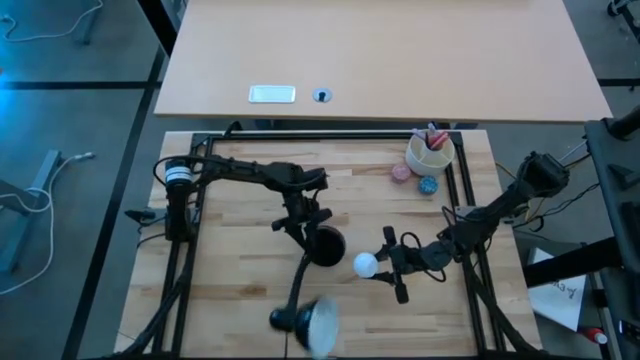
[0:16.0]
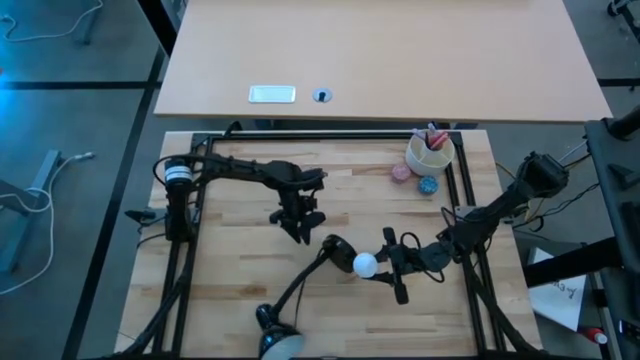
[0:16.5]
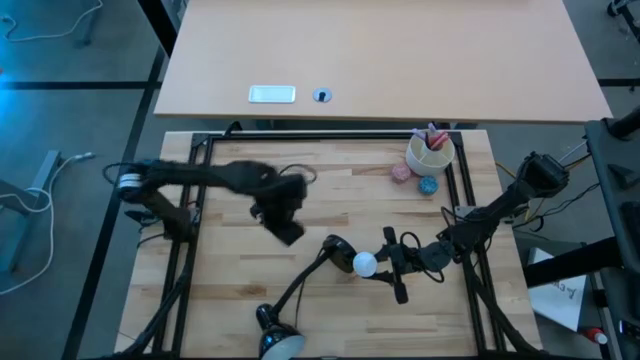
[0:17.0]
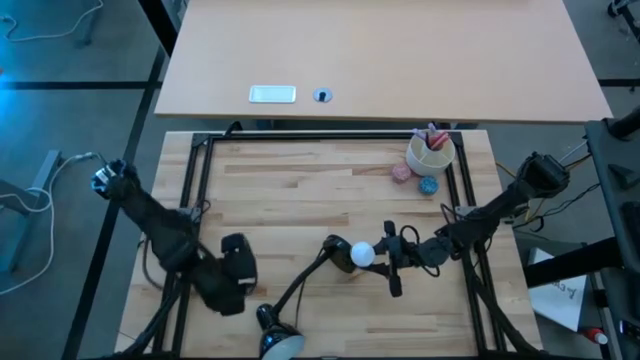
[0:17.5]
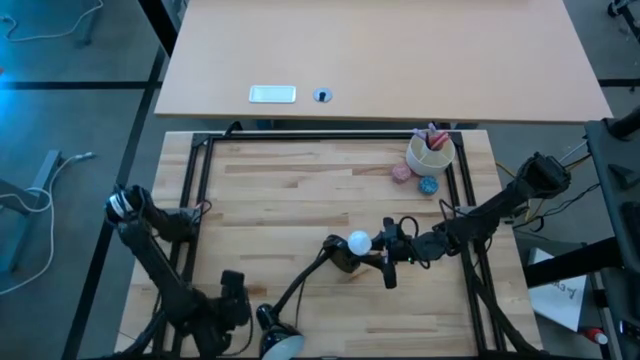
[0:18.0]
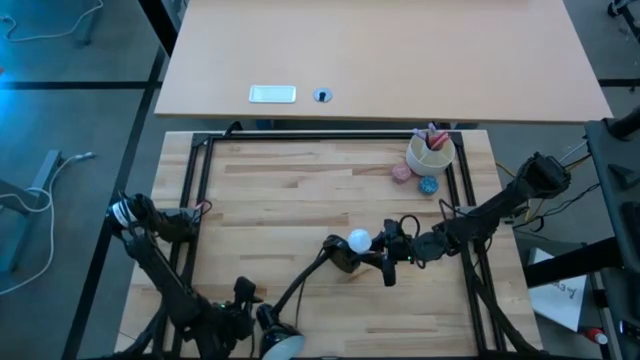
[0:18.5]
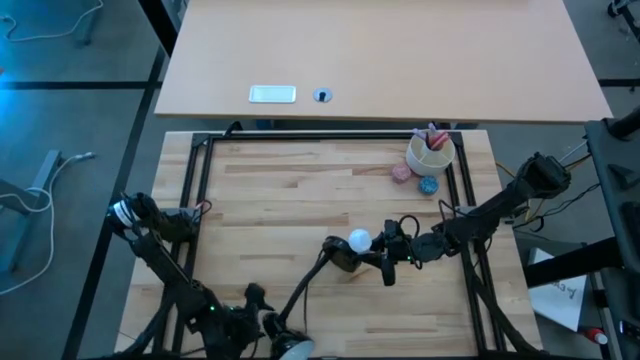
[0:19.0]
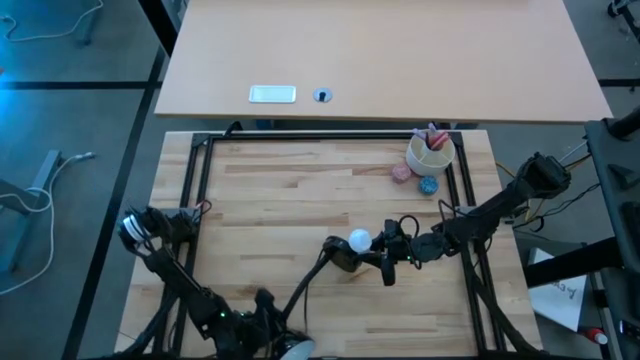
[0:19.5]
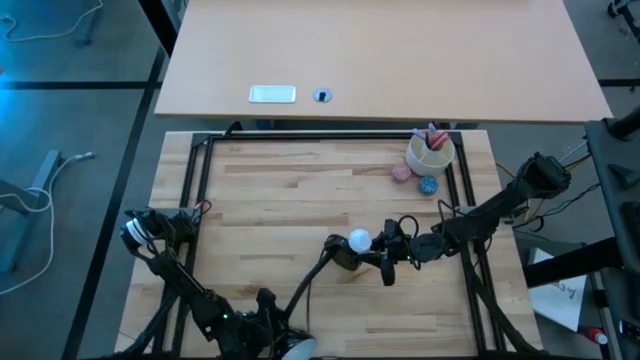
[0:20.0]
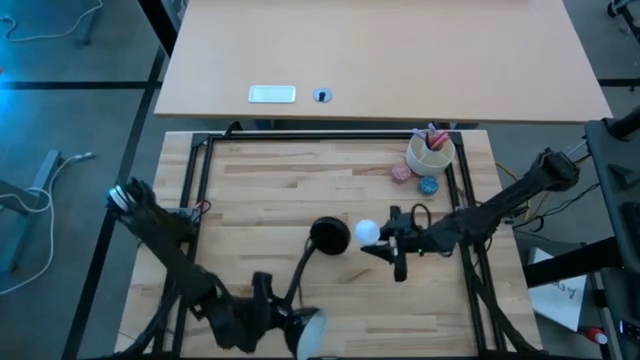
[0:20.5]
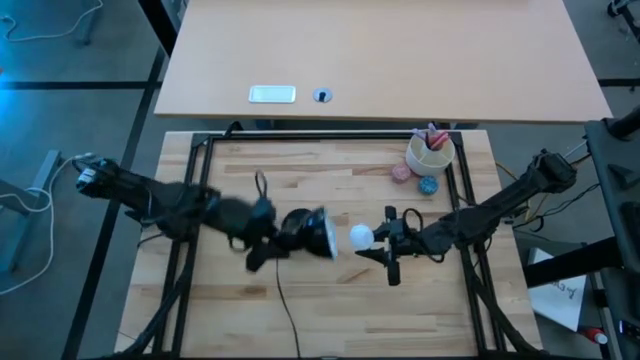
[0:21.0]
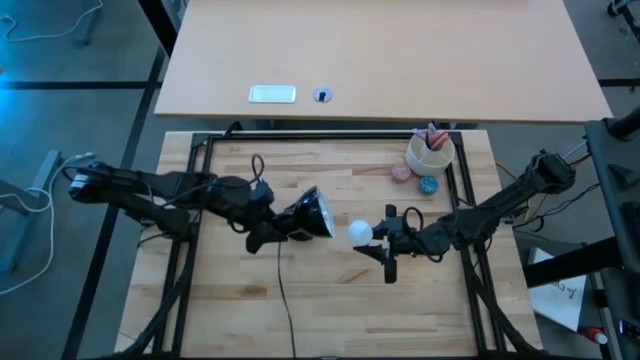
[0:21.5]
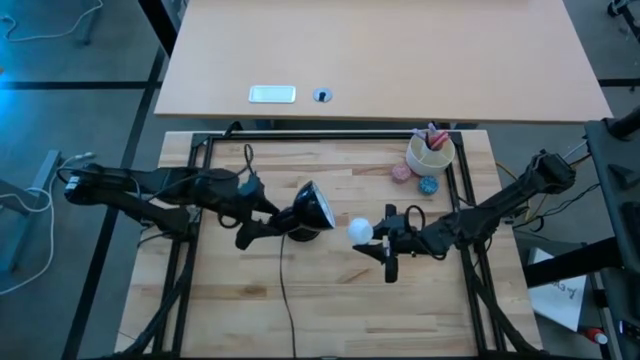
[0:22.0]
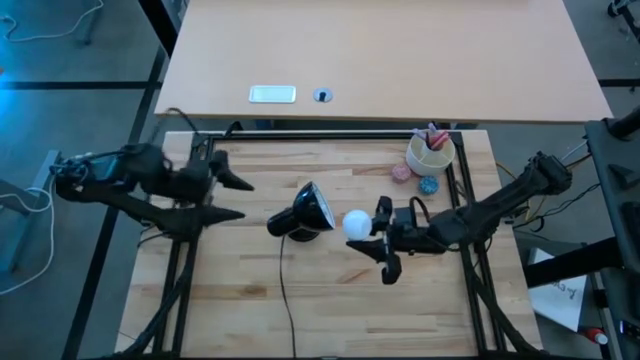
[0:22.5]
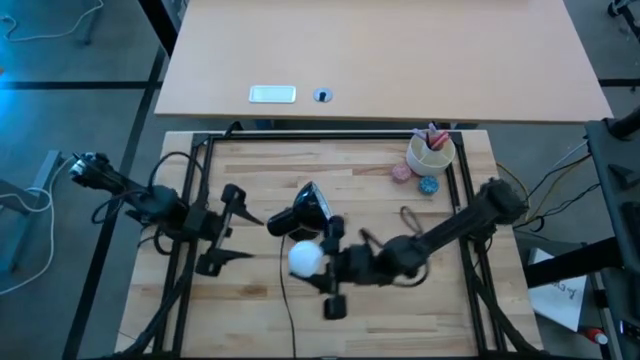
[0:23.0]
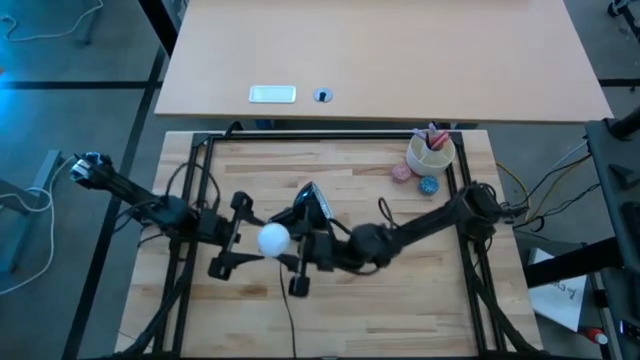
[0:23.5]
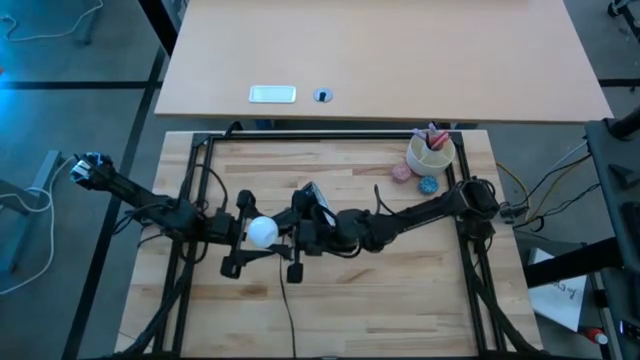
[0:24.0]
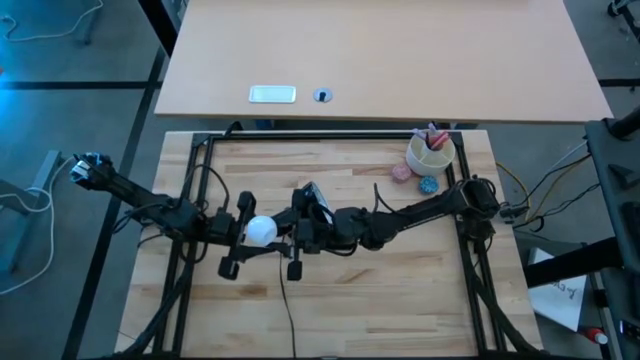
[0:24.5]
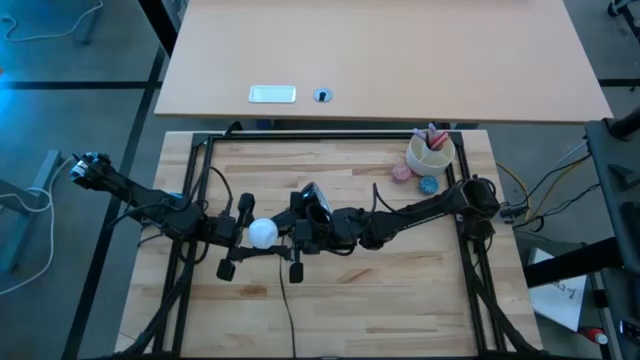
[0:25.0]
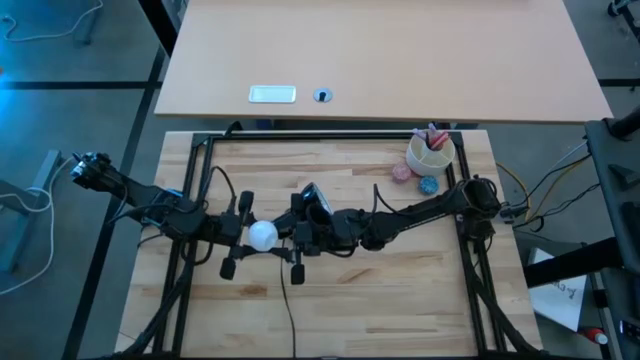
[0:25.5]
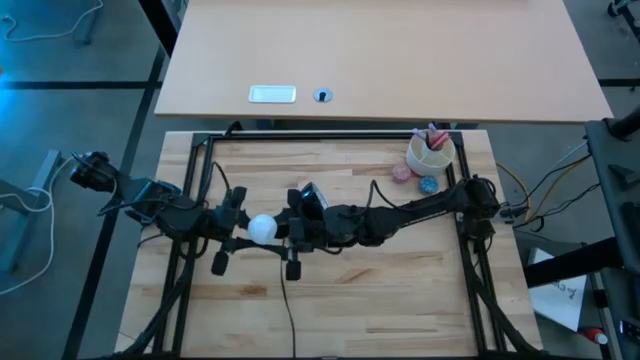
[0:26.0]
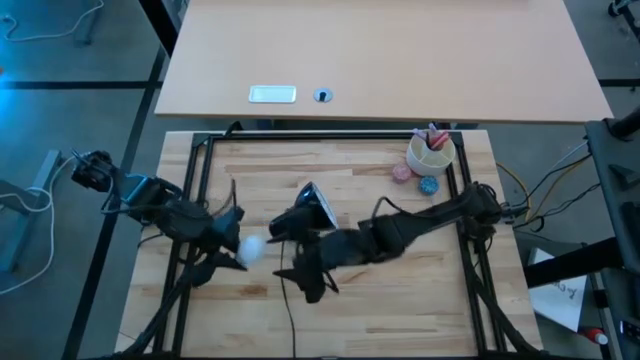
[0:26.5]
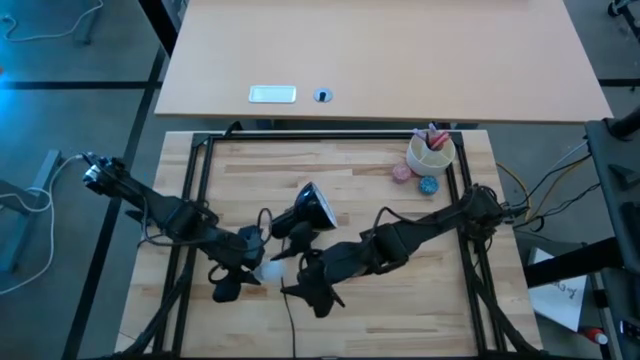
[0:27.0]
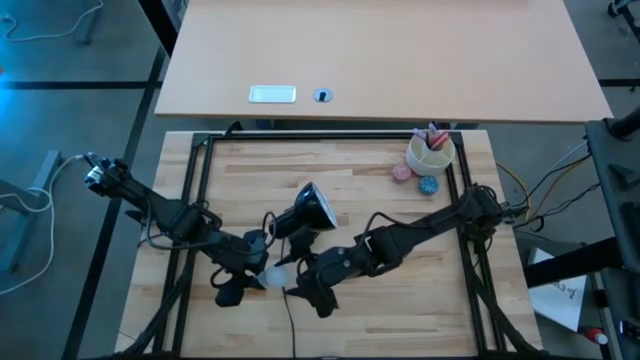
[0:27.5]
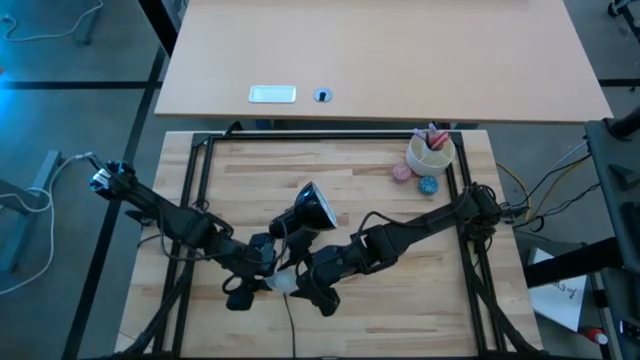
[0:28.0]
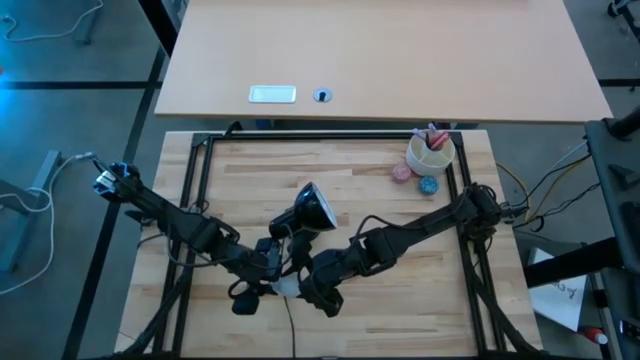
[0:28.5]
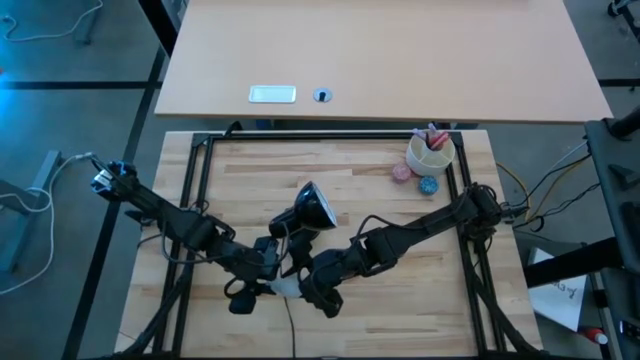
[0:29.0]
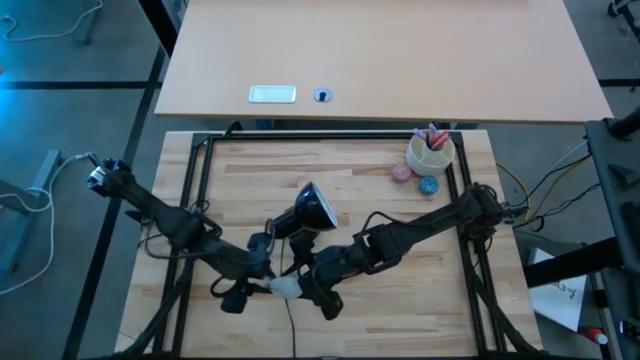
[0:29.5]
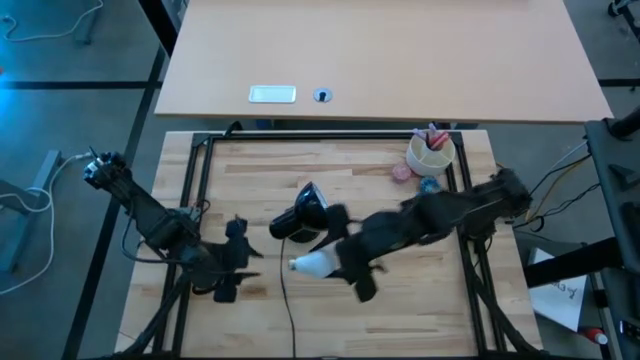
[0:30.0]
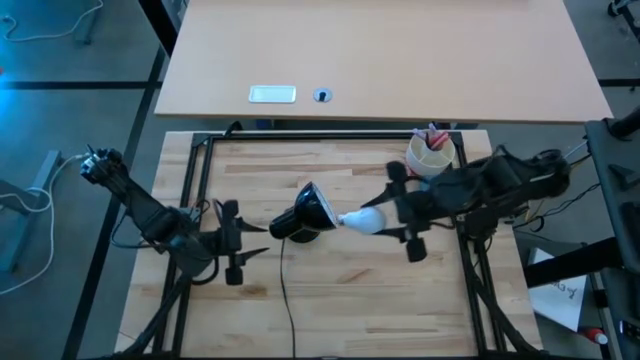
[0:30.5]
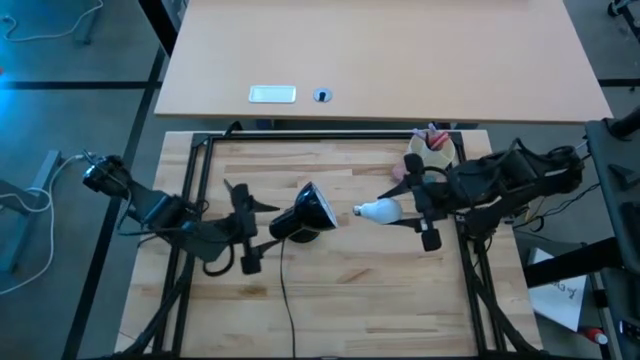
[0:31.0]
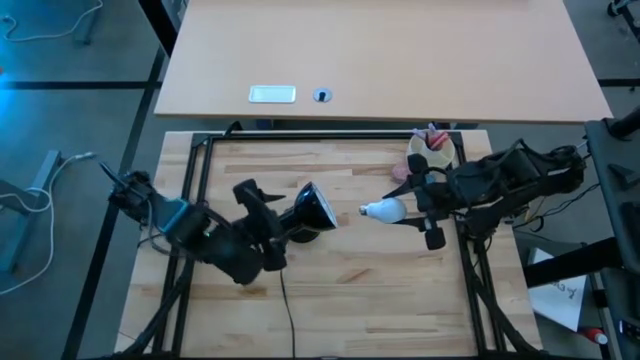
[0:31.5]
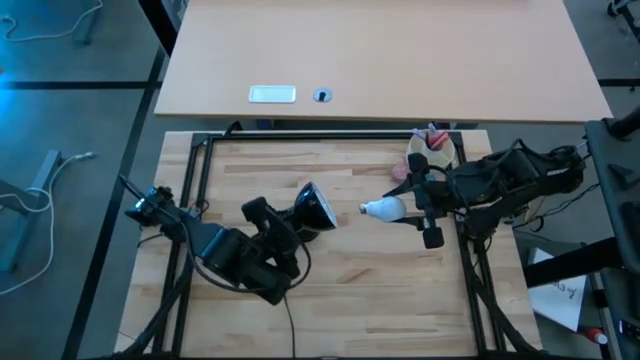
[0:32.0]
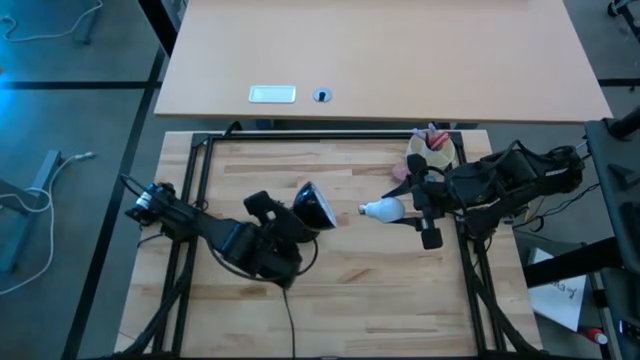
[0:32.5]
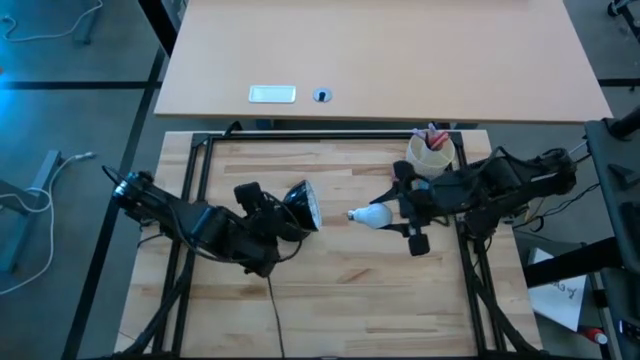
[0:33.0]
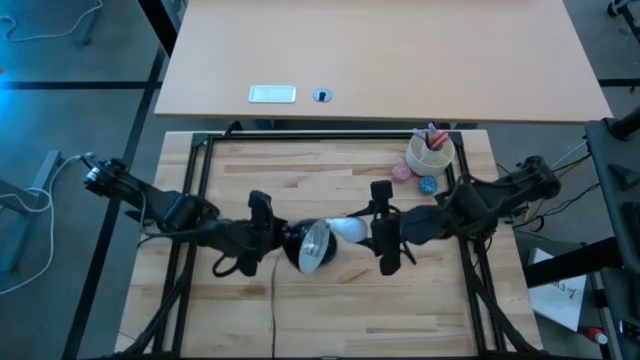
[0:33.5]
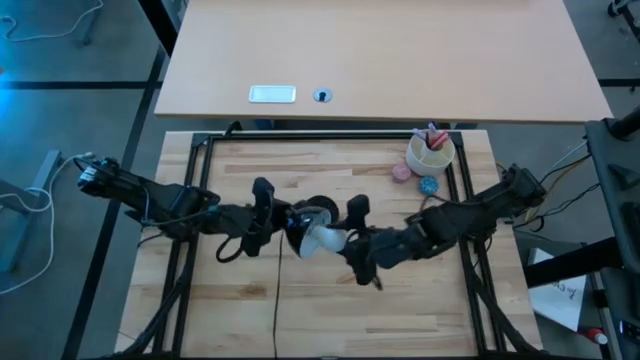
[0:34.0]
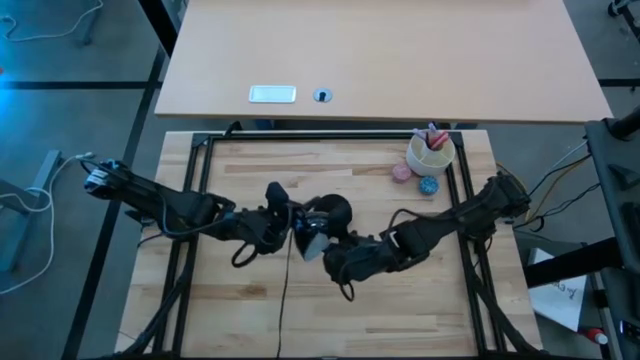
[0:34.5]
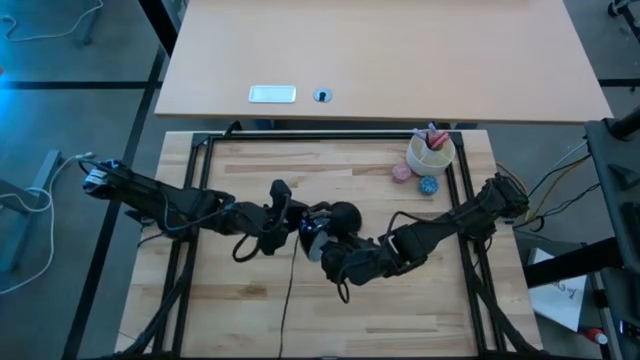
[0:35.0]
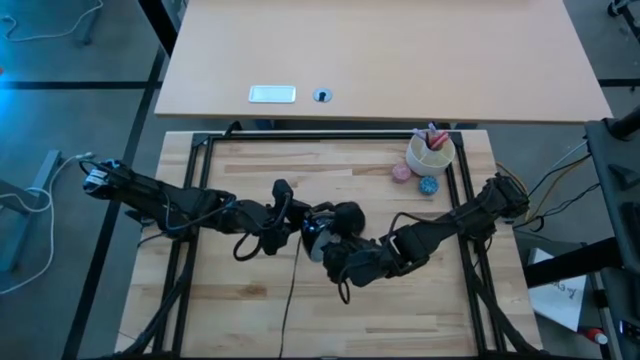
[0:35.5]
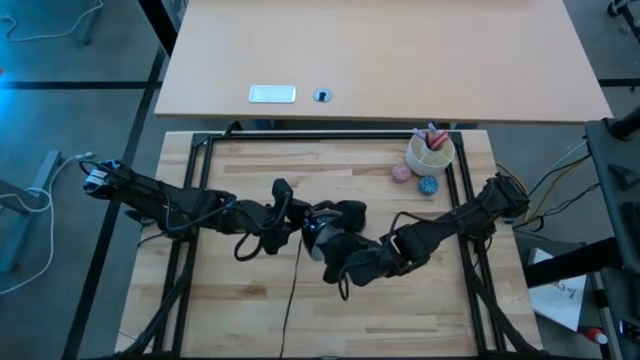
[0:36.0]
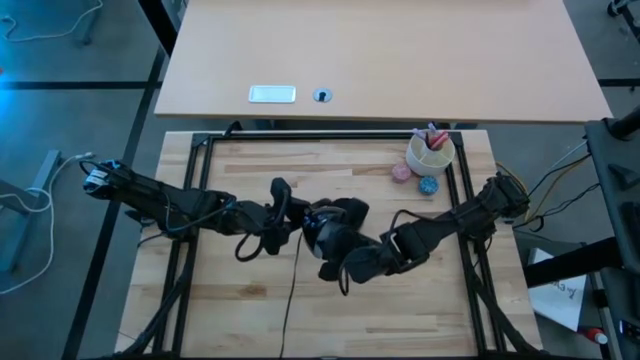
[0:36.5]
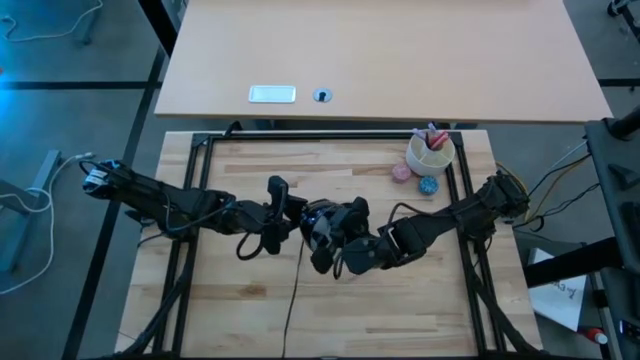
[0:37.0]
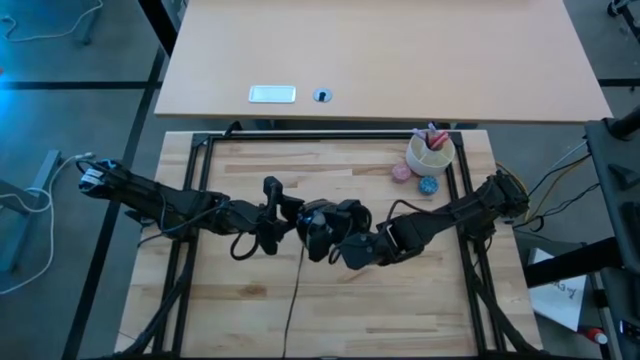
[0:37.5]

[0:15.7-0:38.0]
Task: Screw lightbulb
Insert the lightbulb into the lamp
